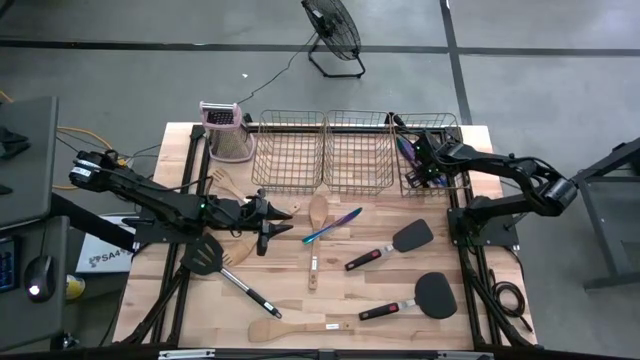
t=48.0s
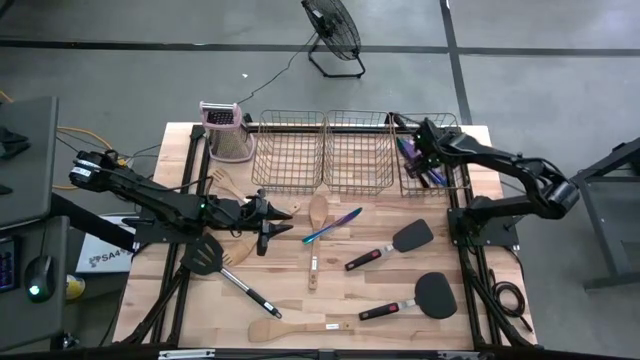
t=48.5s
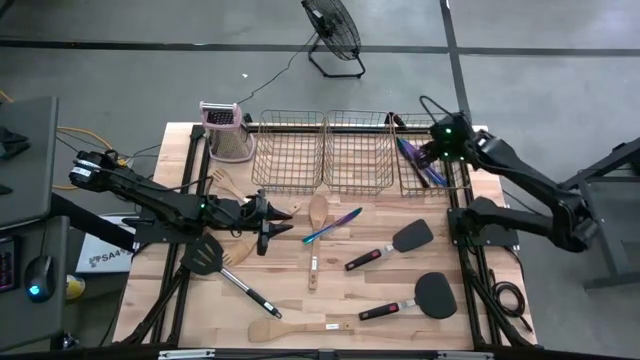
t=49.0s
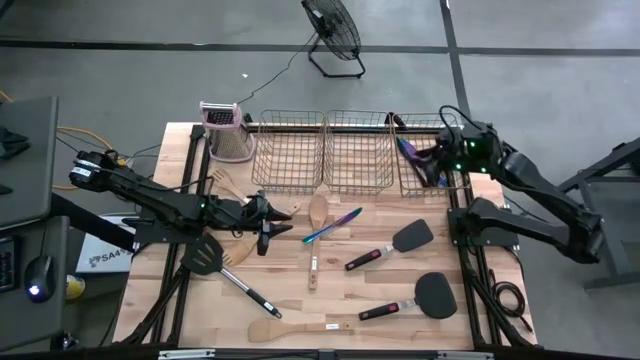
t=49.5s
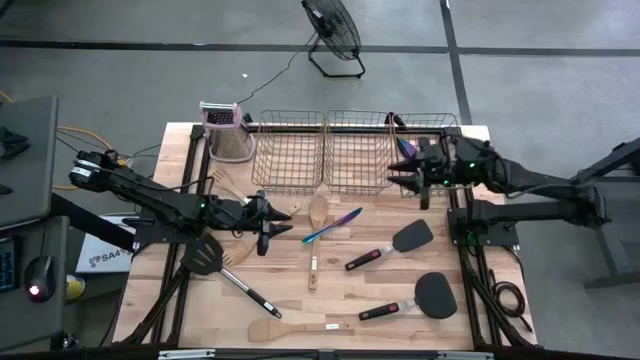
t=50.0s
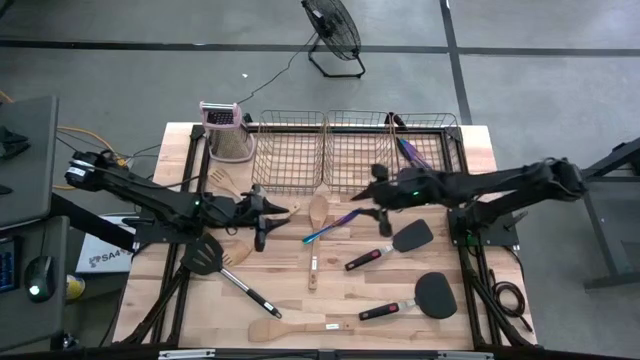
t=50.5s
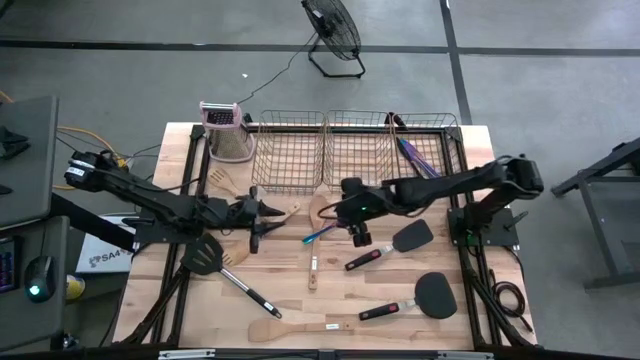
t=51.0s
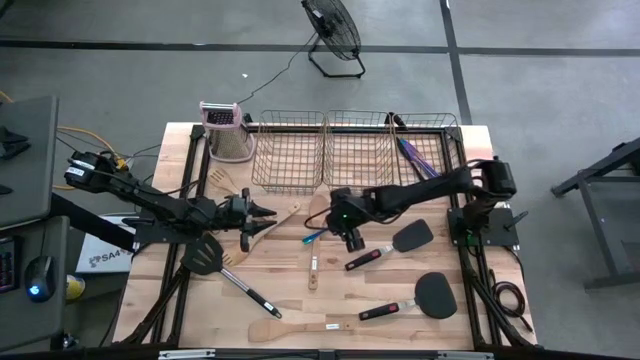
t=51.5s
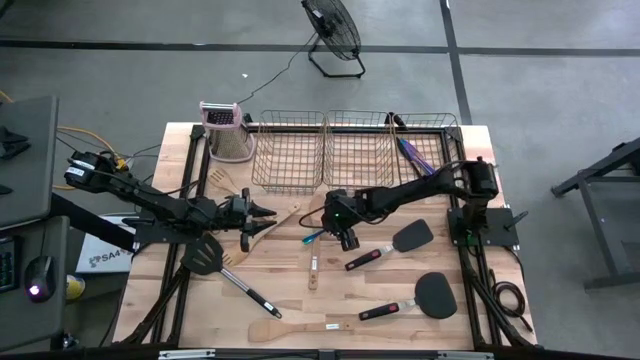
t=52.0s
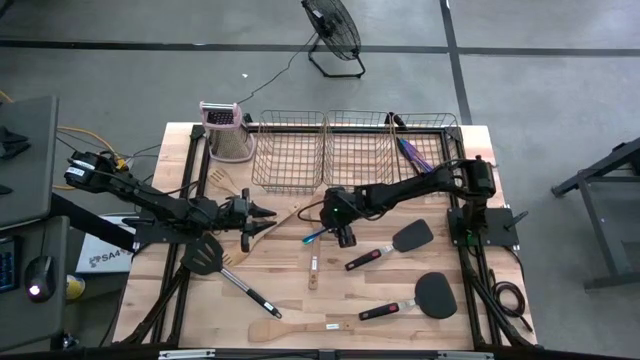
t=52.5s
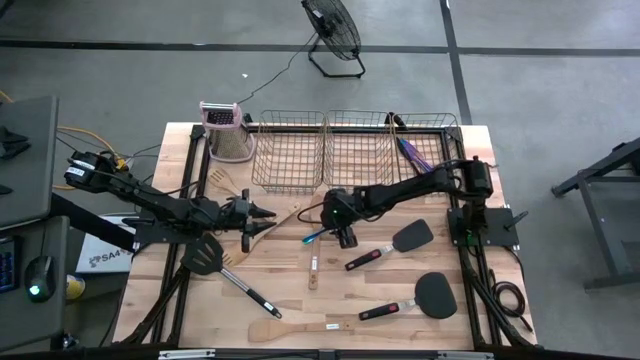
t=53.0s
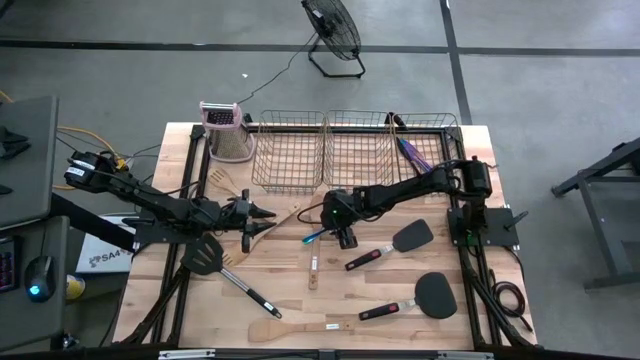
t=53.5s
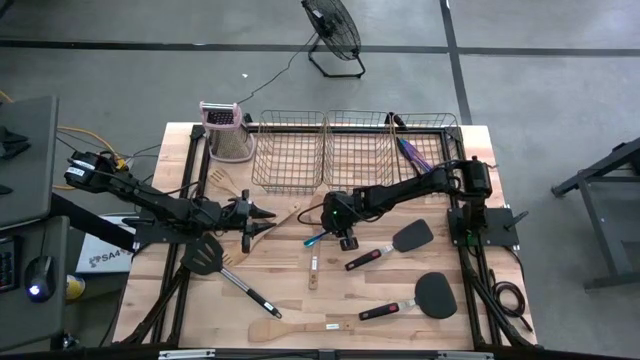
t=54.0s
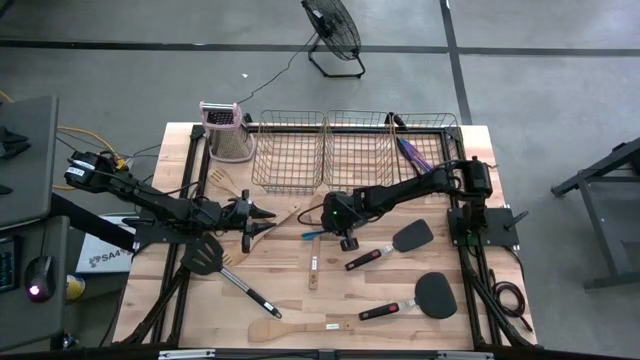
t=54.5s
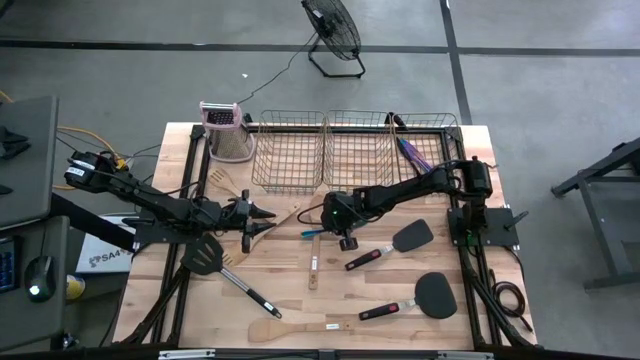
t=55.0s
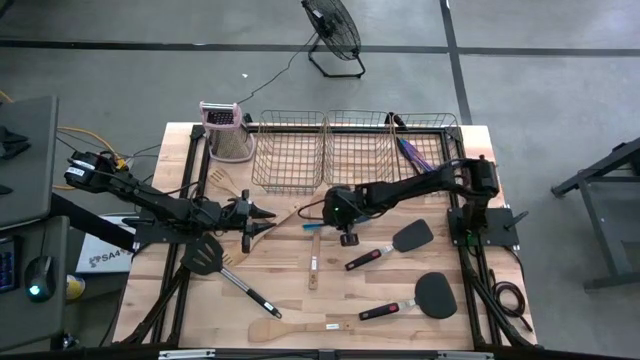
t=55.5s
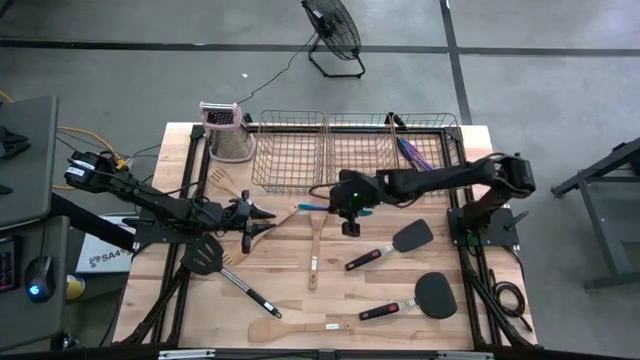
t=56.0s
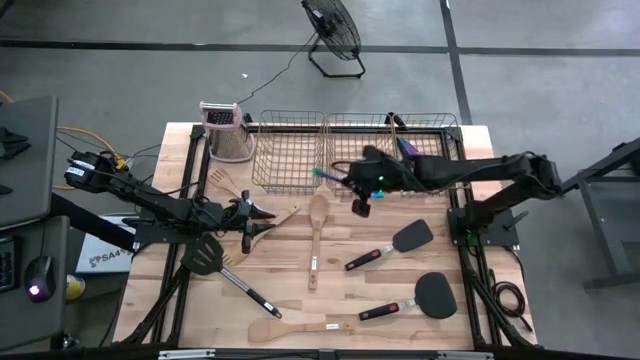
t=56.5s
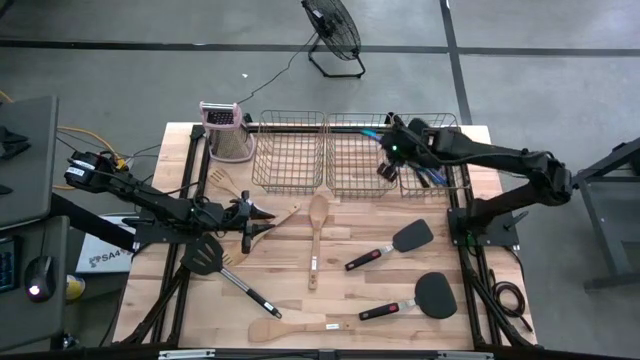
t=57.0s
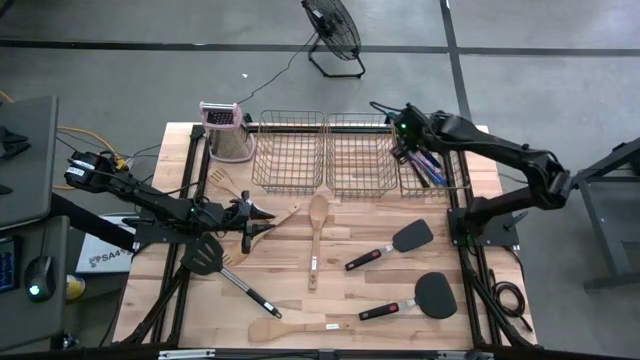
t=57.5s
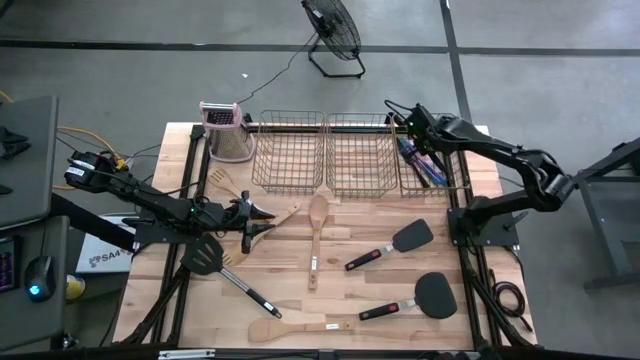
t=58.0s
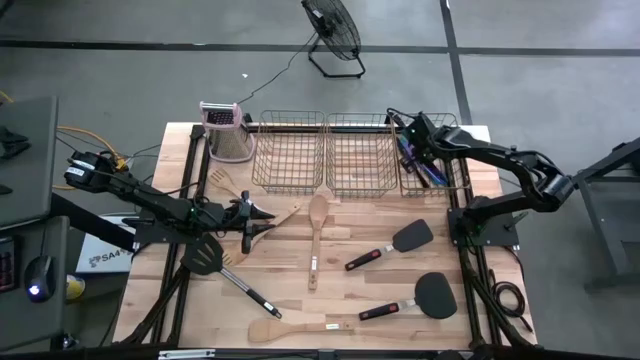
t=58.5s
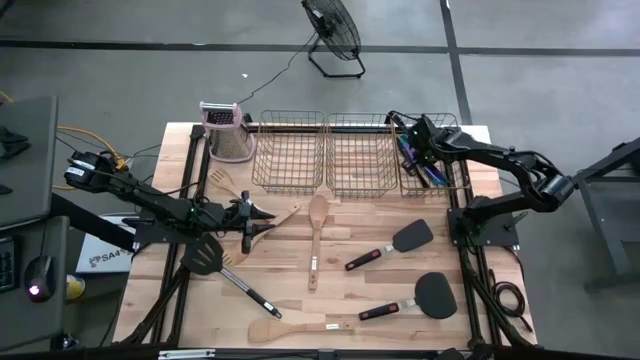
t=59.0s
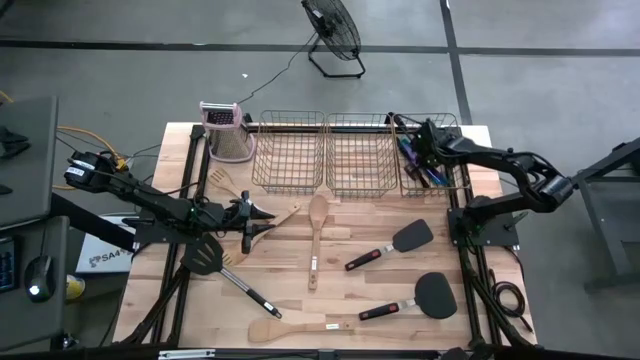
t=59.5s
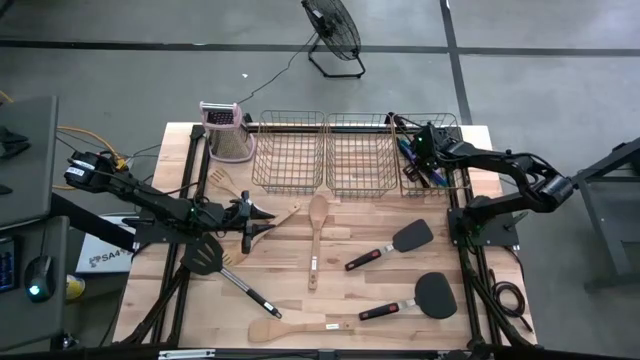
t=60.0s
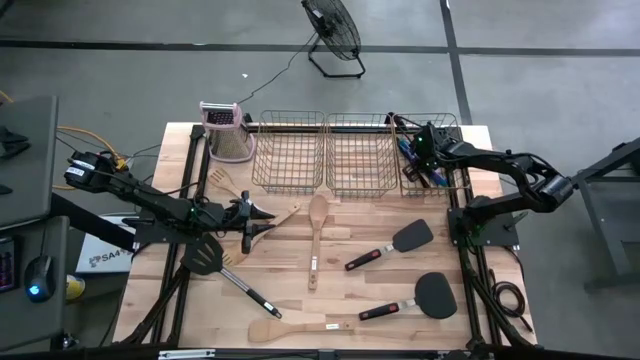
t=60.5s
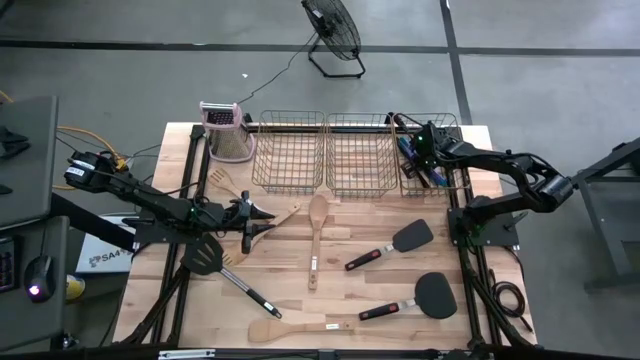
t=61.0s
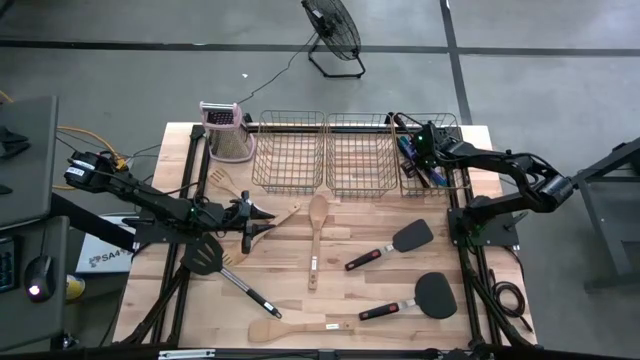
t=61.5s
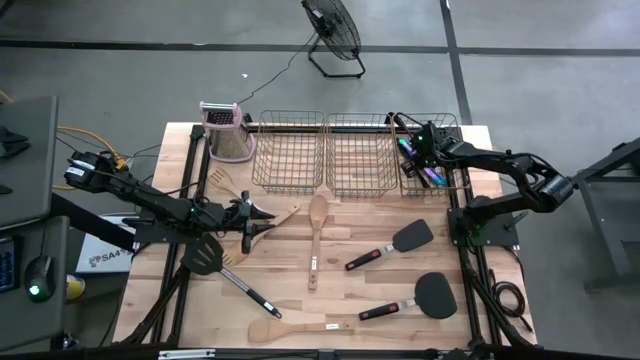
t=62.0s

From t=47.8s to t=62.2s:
Task: Pick & Place Kitchen Items
Put the blue table knife into the right mesh basket

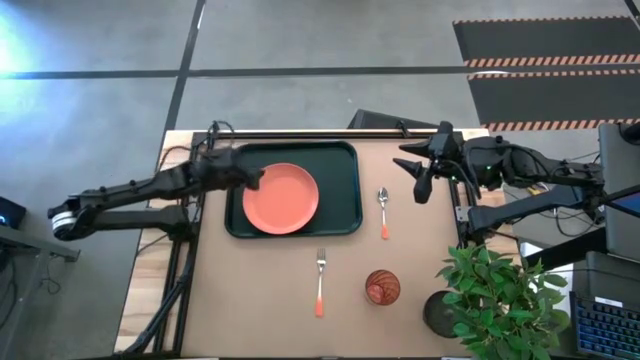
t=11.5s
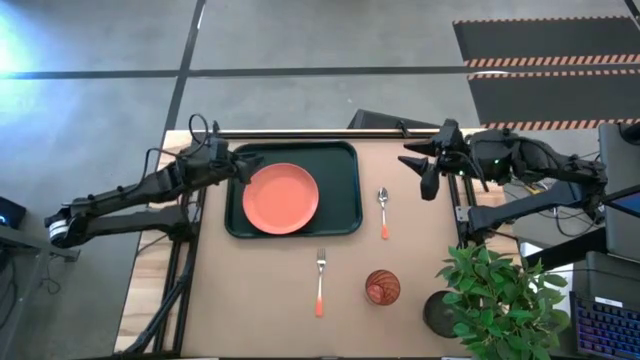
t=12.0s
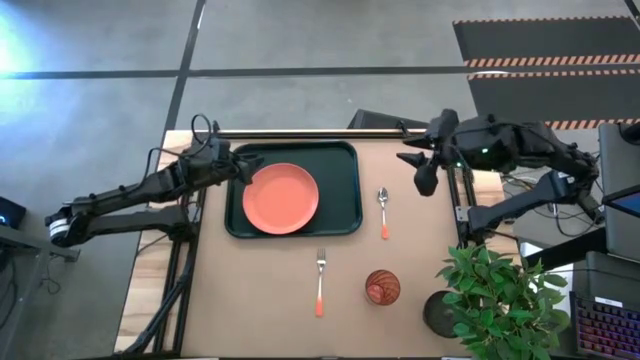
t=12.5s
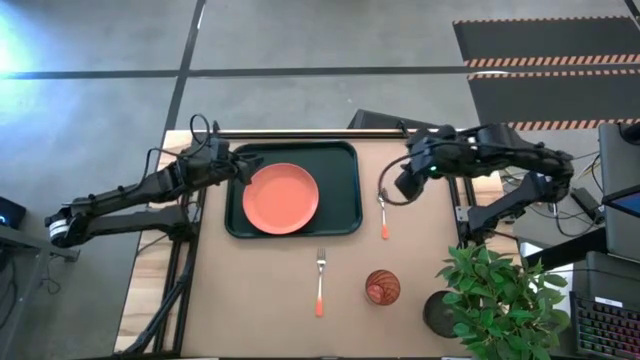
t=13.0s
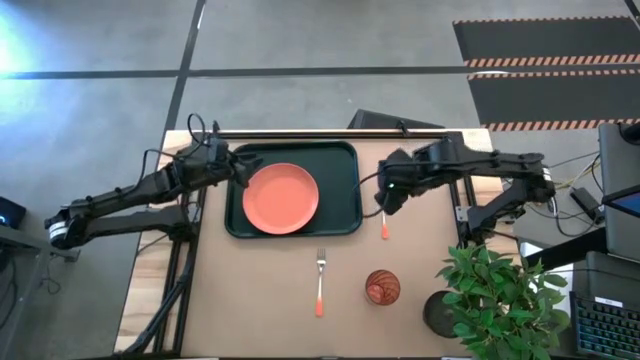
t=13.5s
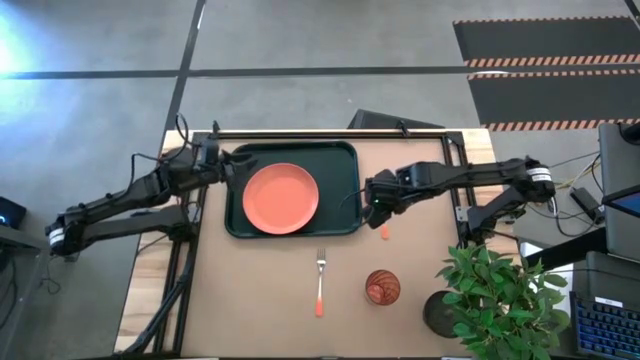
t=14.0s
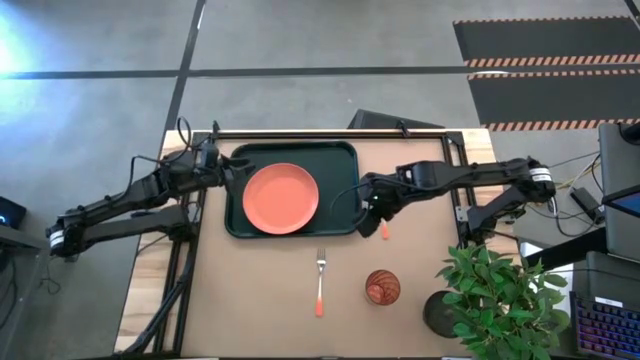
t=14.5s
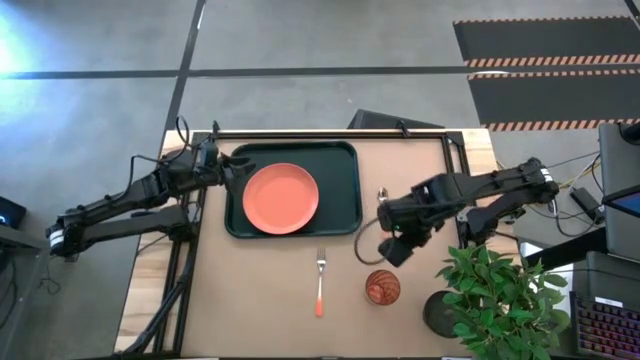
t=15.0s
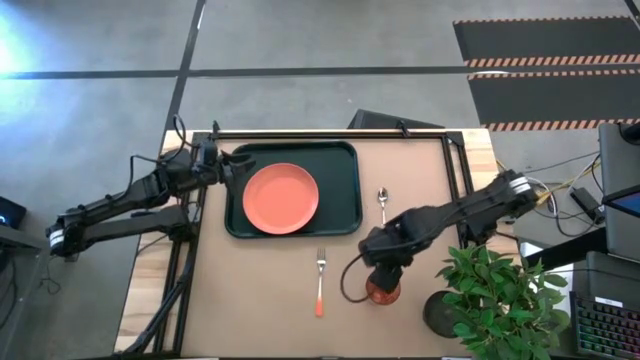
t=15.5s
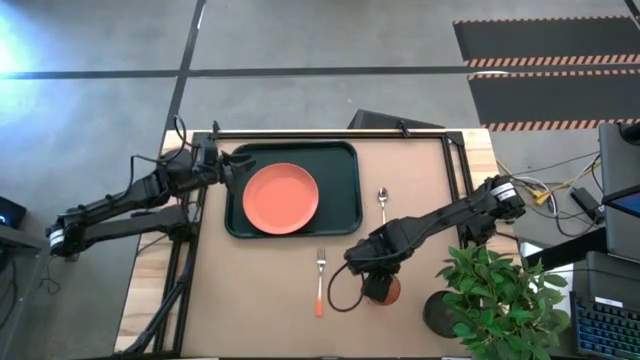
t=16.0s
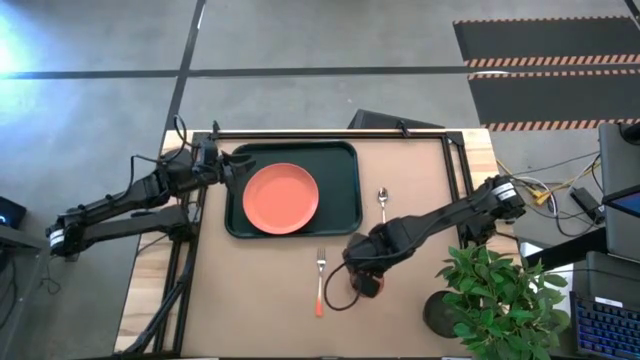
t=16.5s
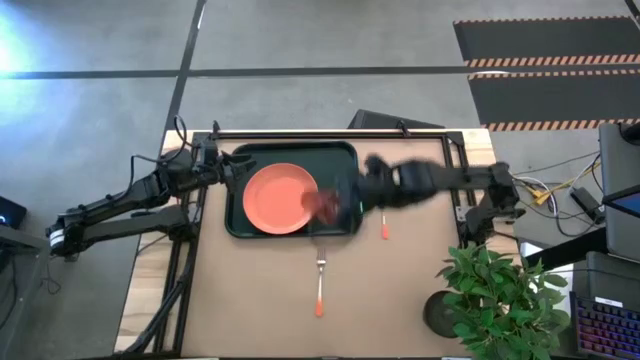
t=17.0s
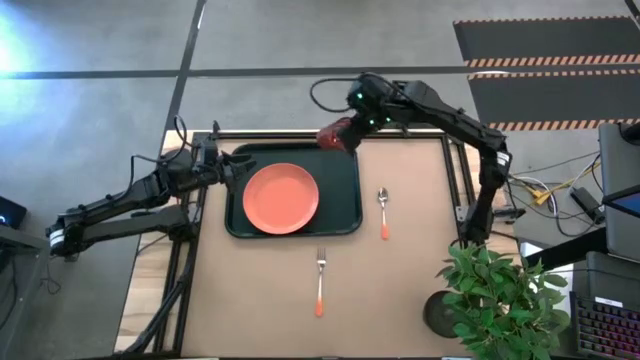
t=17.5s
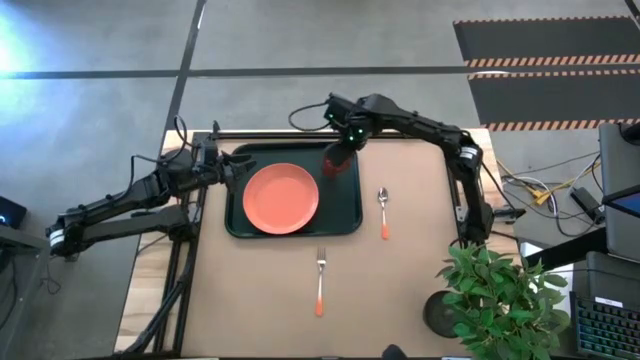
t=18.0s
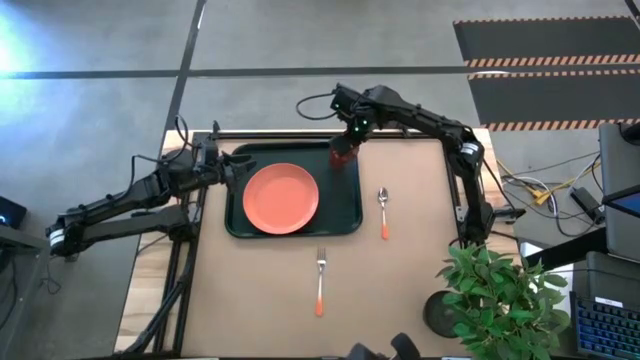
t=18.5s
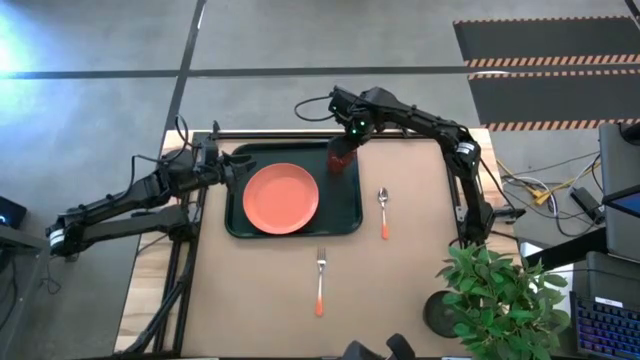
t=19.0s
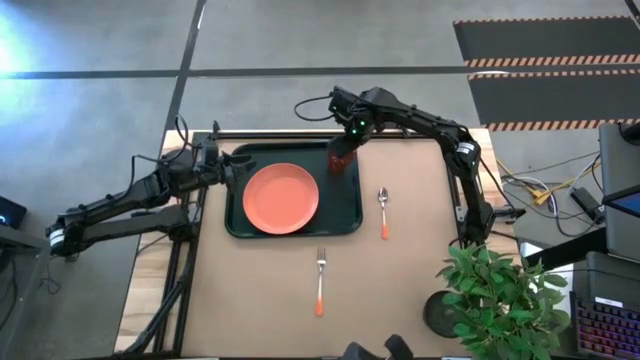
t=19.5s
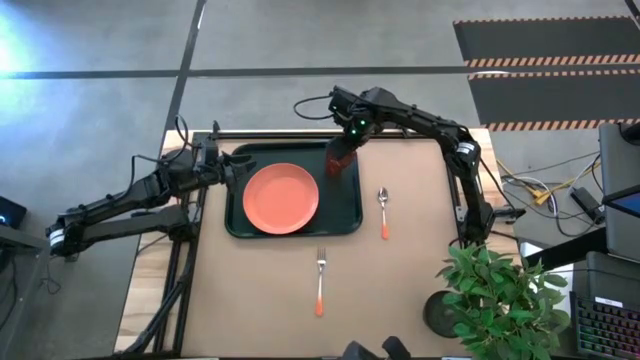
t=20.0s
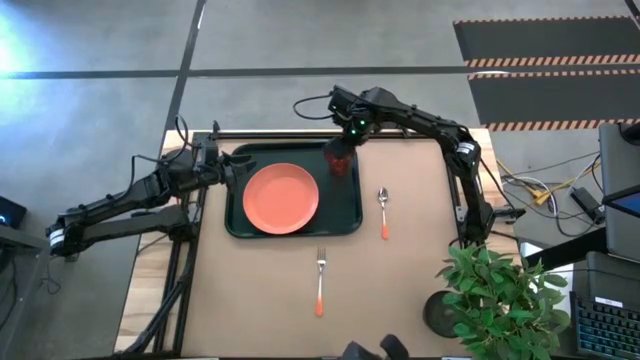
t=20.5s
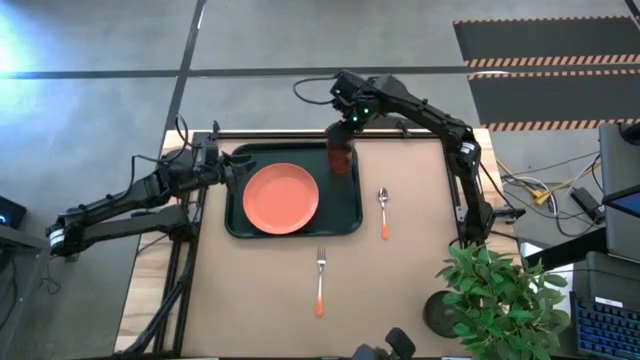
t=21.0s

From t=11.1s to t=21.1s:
Task: Pick and place plate/cup/fork/spoon on tray
Put the orange glass to the top right of the orange plate on the black tray
